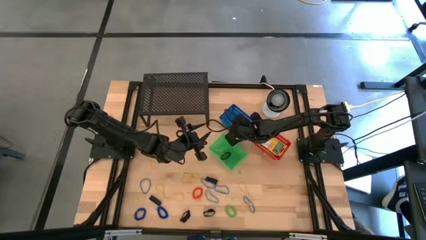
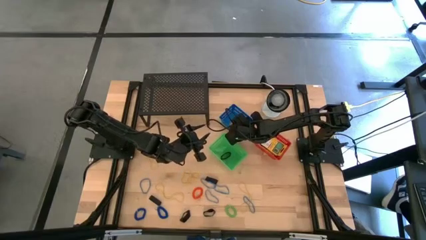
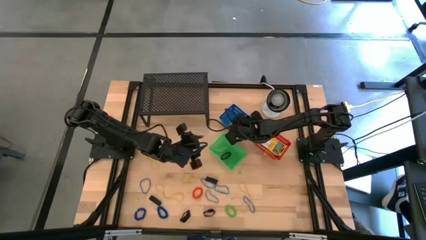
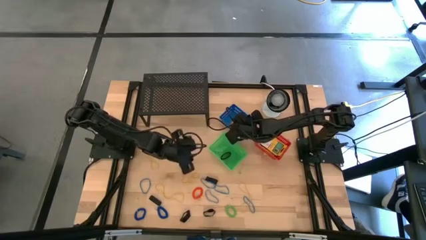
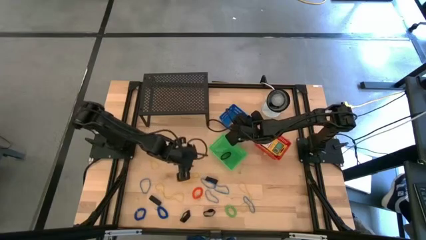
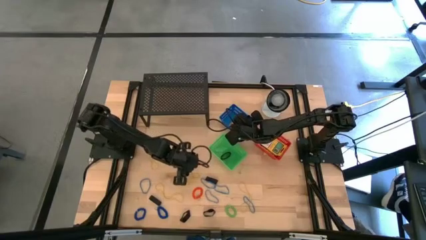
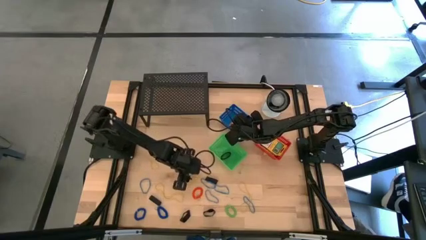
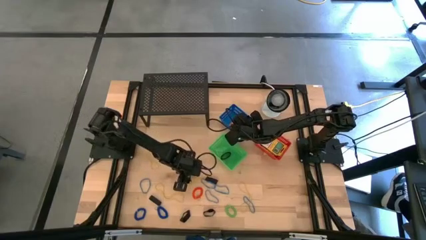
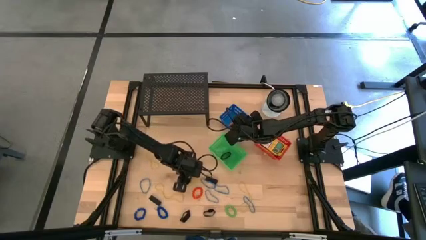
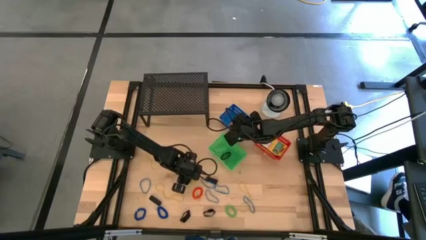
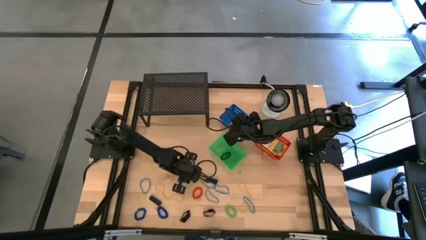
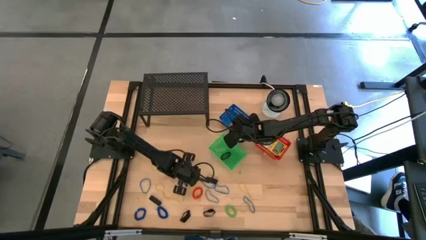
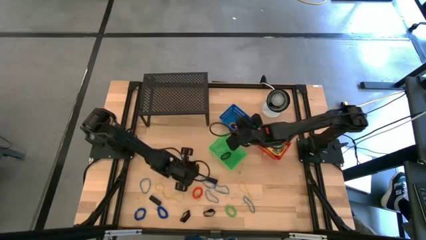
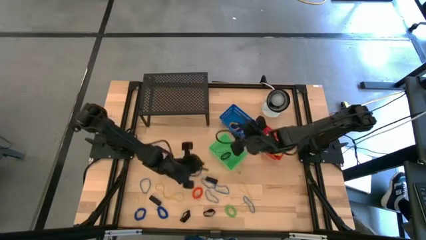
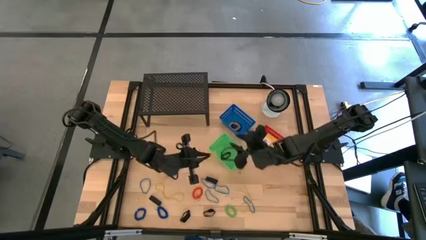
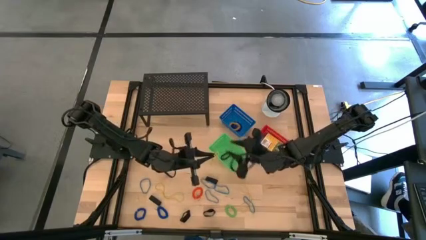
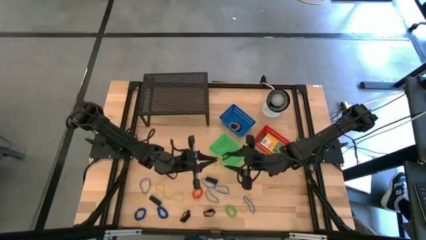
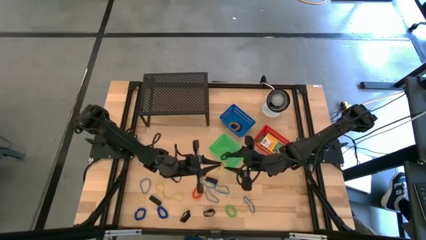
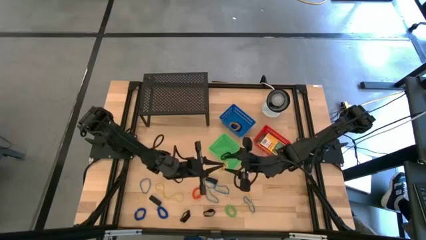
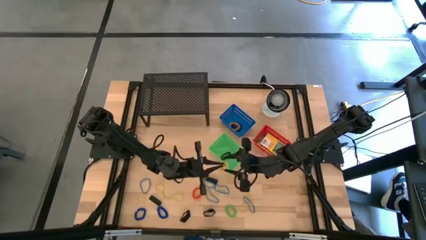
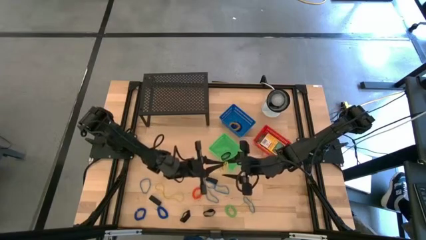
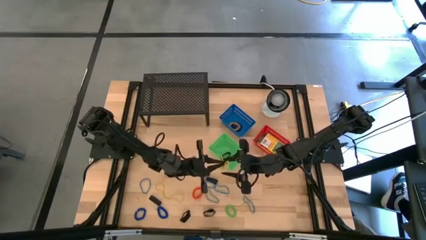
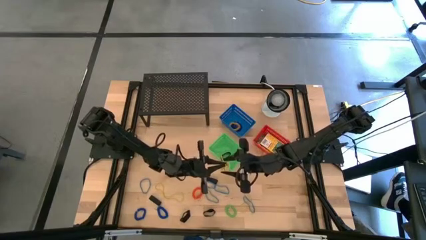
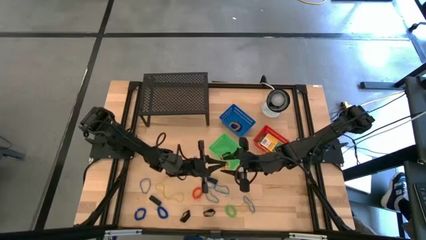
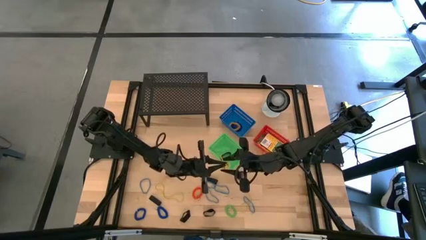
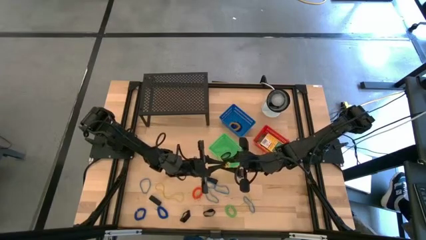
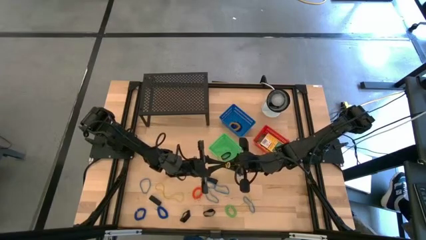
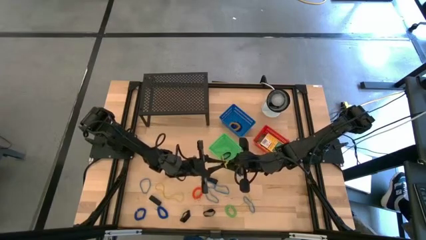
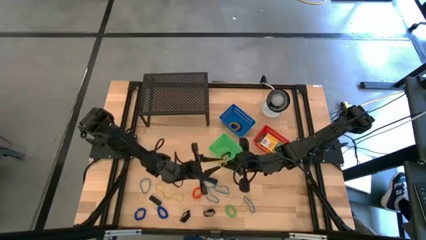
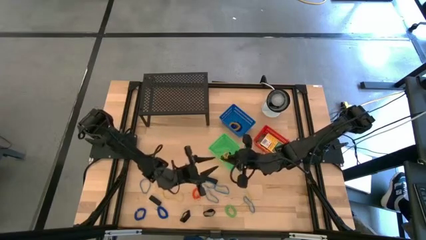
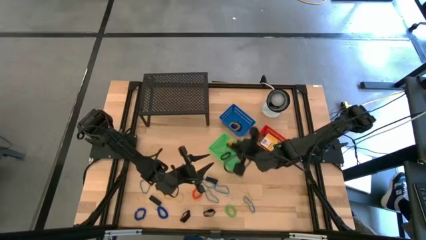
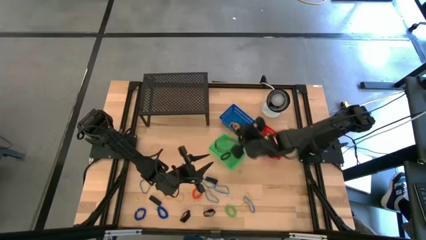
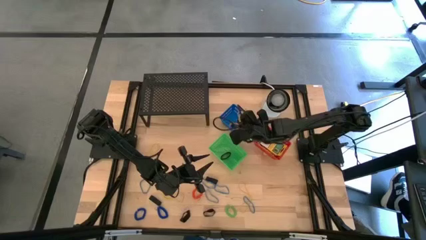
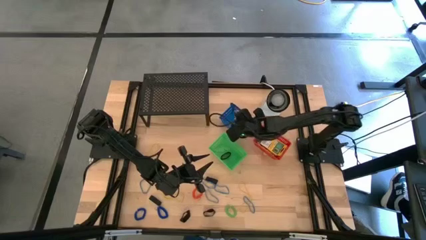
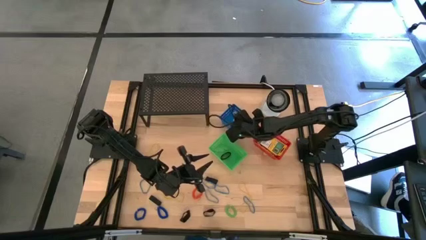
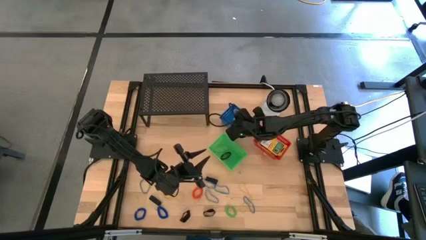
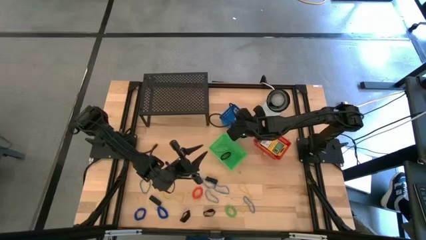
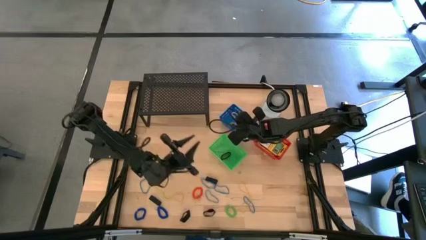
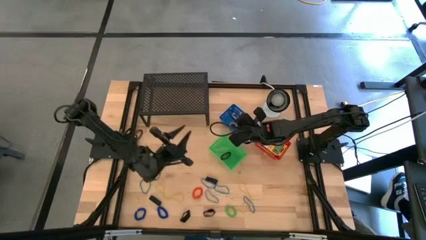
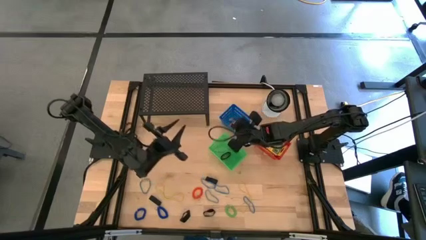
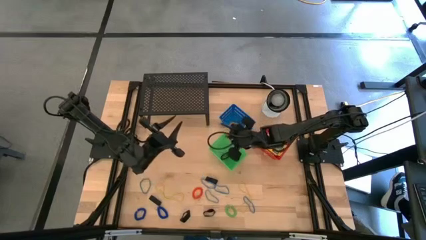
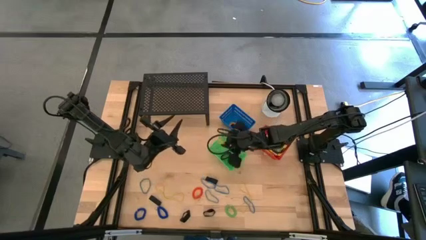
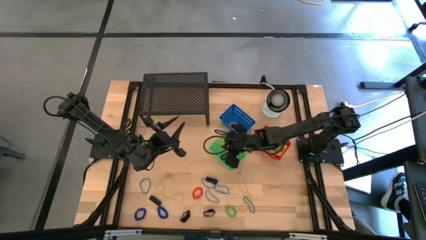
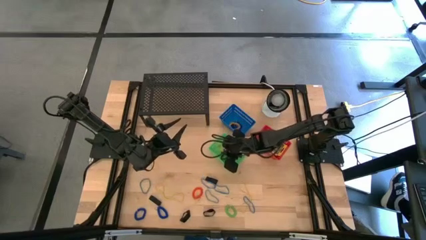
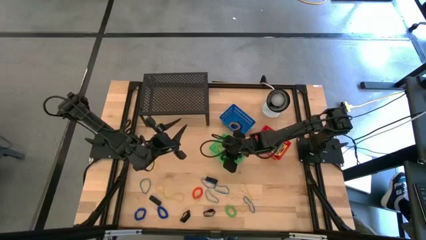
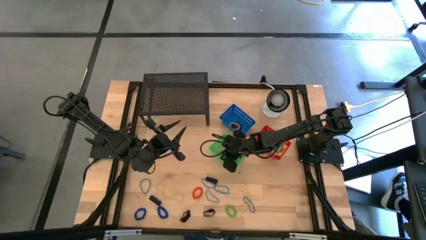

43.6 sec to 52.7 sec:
Task: Pick & Place Office Desk Supplies
Put the yellow rubber band into the green basket

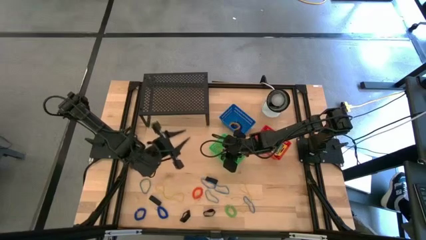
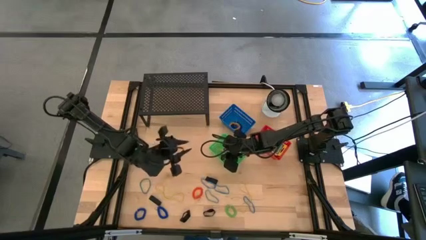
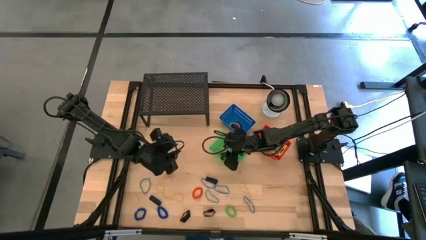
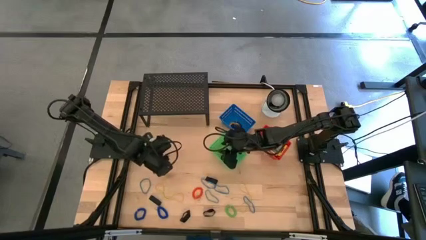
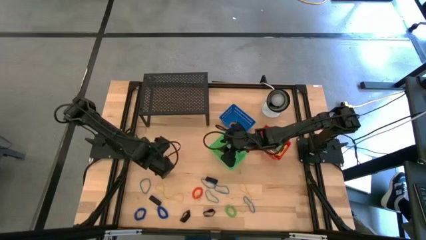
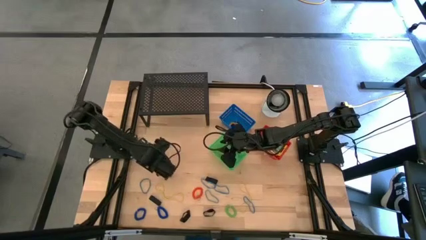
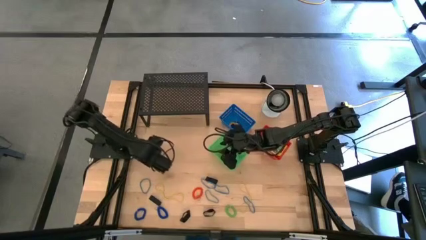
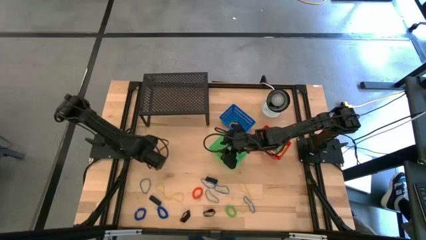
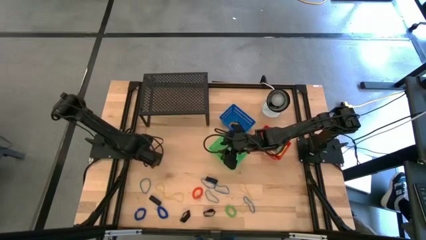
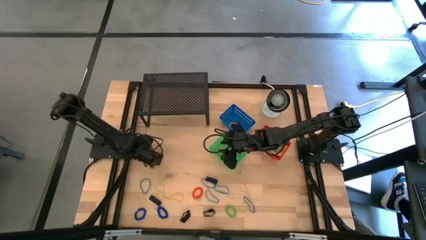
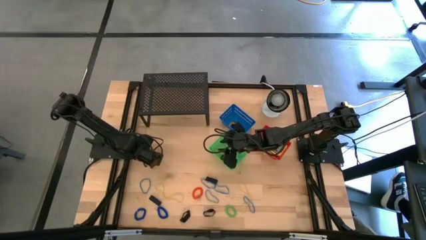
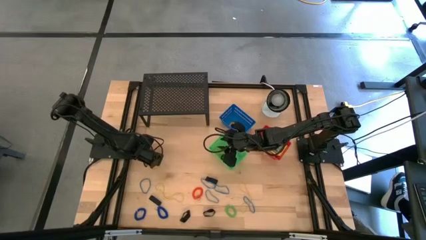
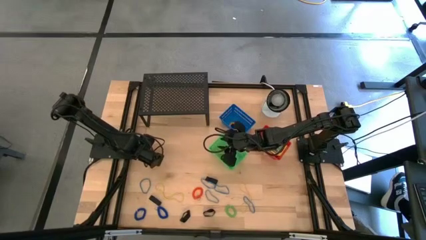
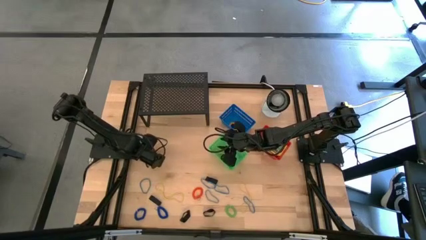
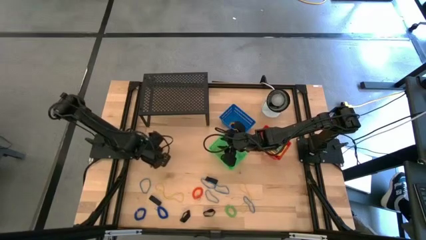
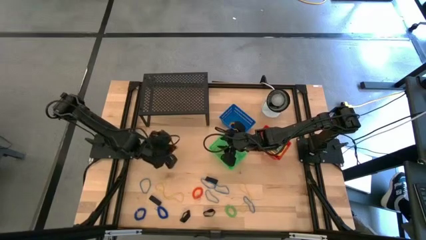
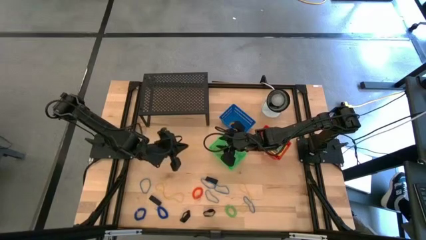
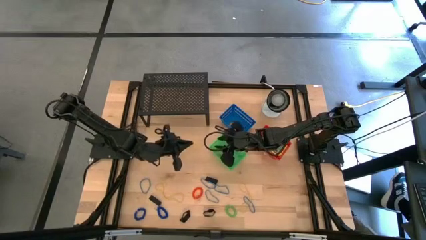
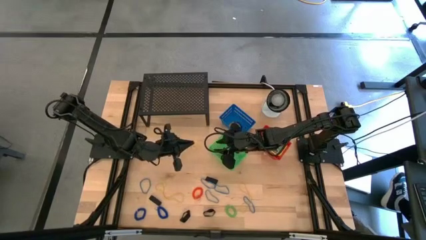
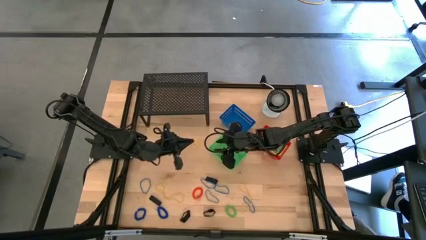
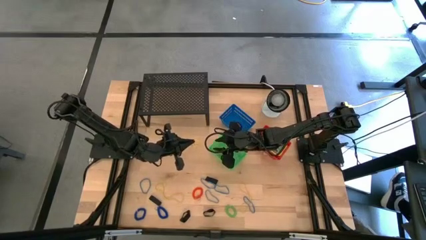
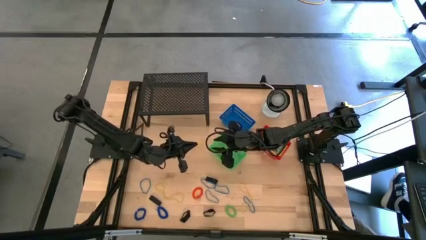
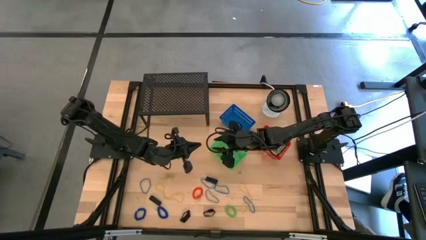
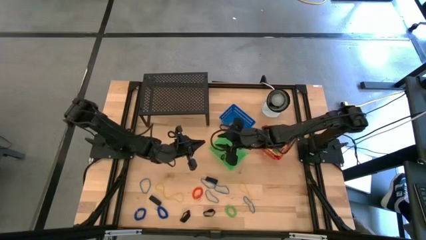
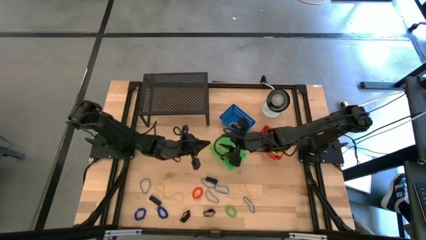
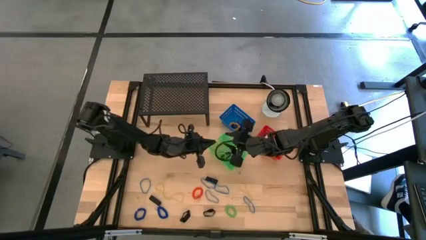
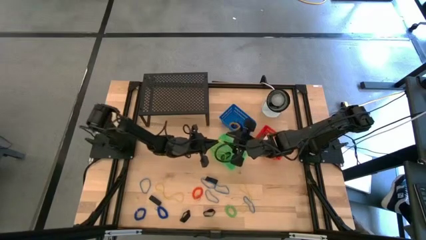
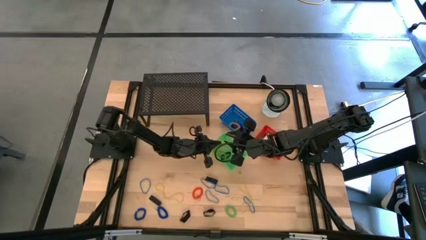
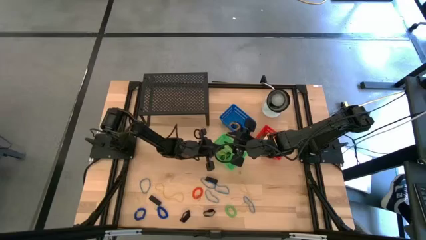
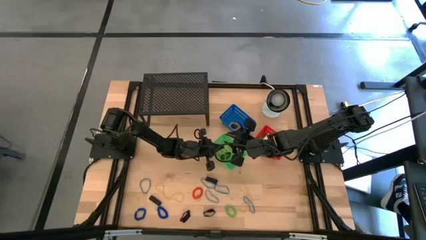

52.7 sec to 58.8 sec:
Put the yellow rubber band into the green basket
